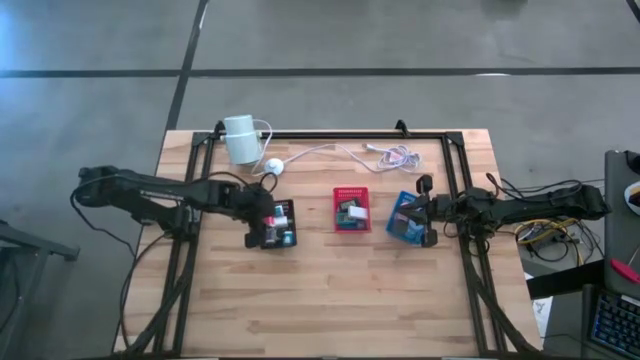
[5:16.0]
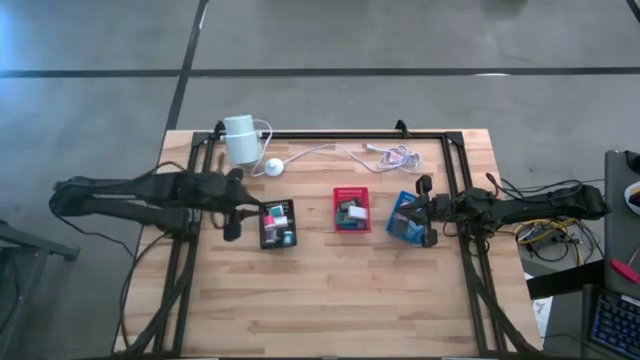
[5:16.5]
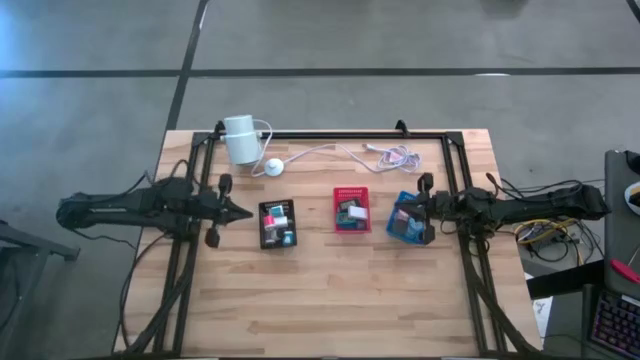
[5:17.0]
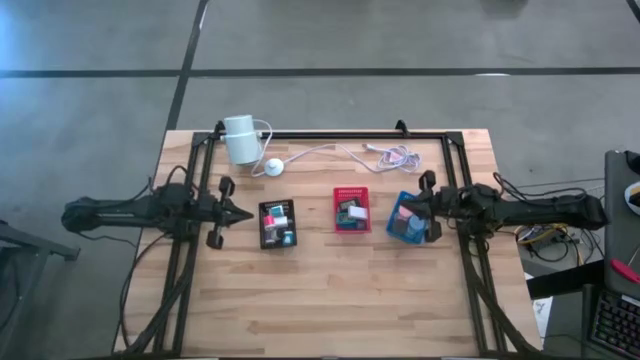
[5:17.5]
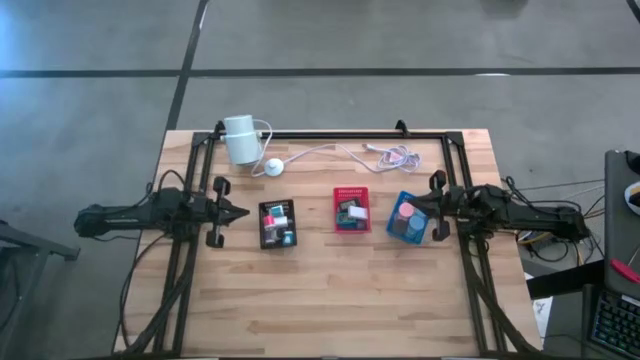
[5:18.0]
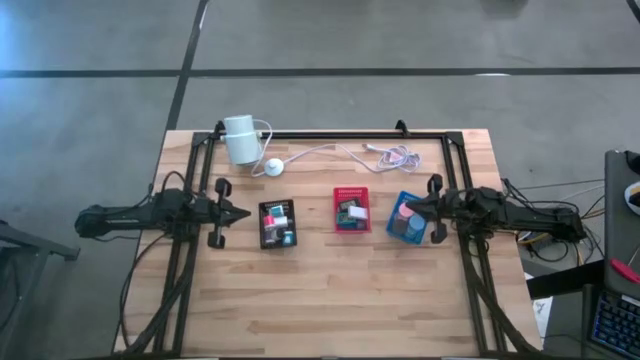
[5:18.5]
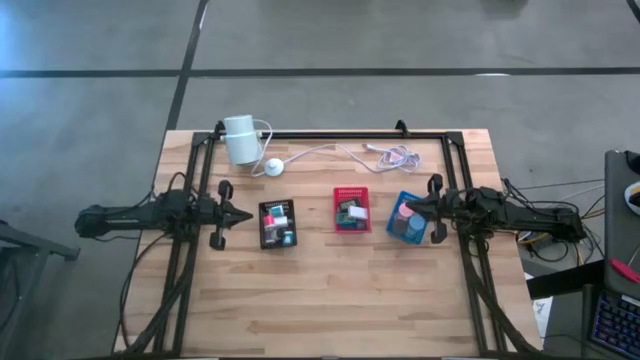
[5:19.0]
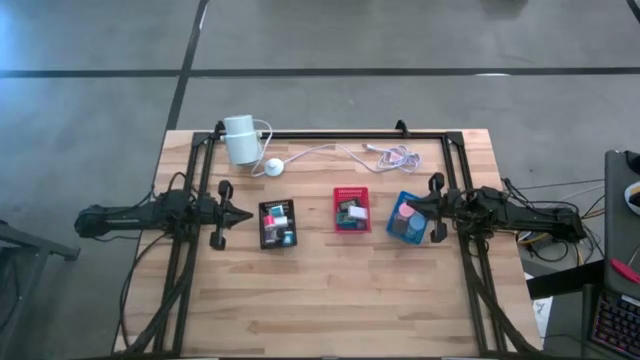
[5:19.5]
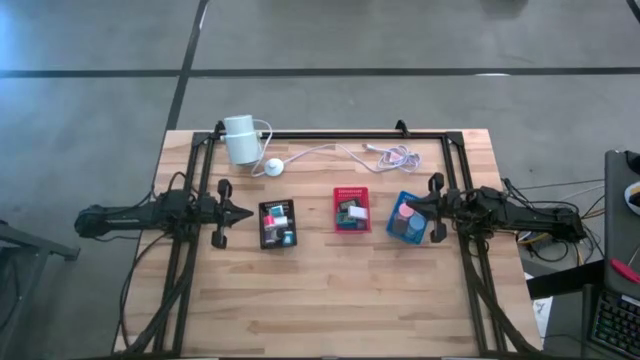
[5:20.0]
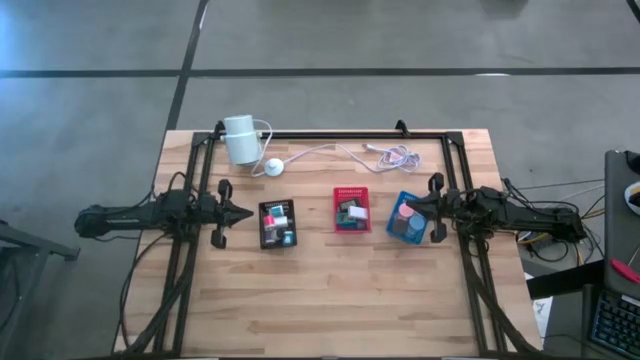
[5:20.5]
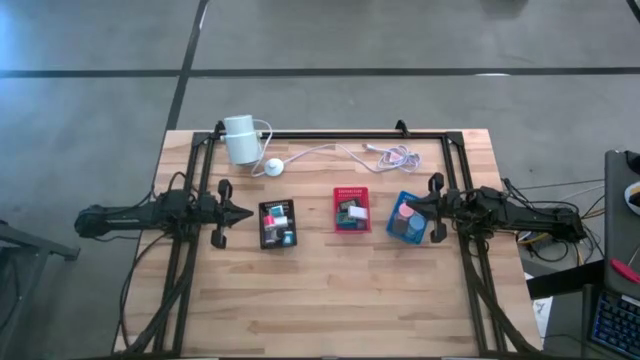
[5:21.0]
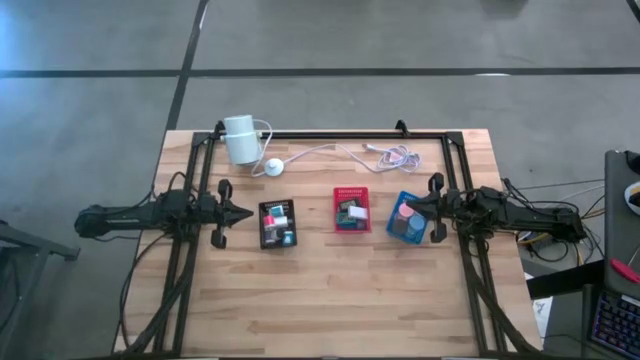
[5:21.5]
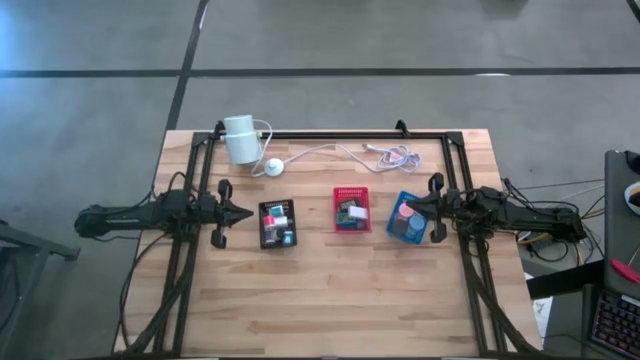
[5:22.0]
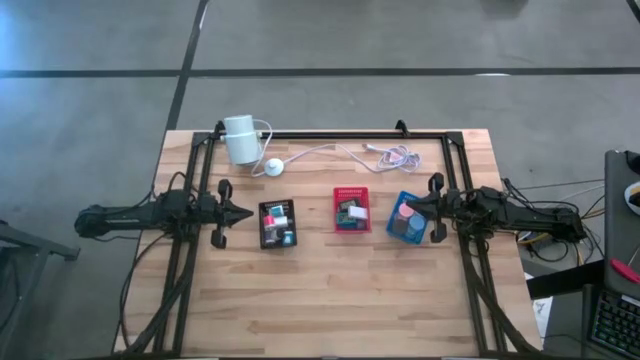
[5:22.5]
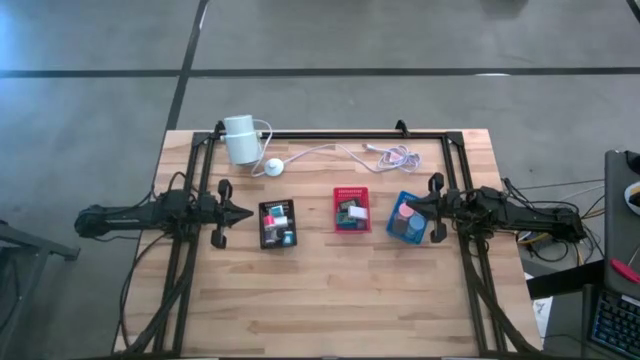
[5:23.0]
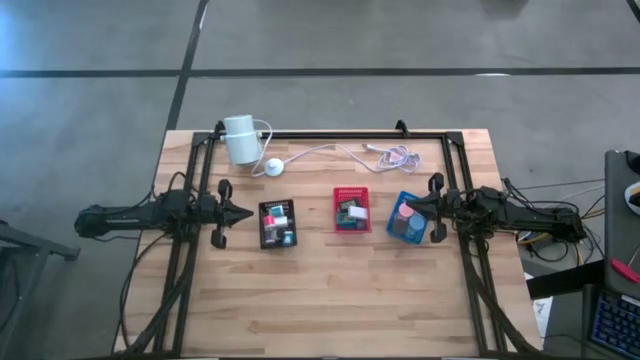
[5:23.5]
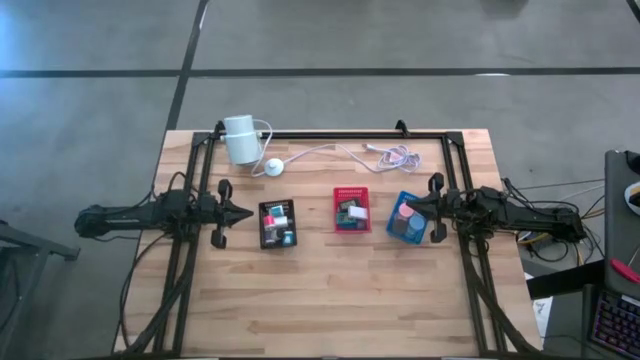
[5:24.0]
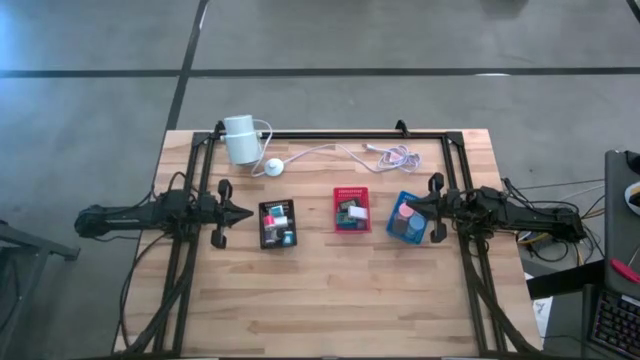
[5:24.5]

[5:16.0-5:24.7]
Task: Pick & Place Office items
Return to Home Position

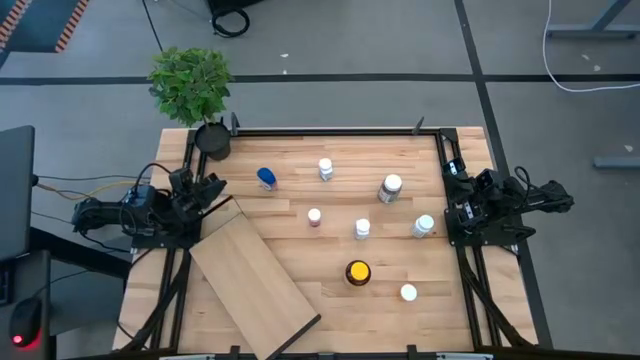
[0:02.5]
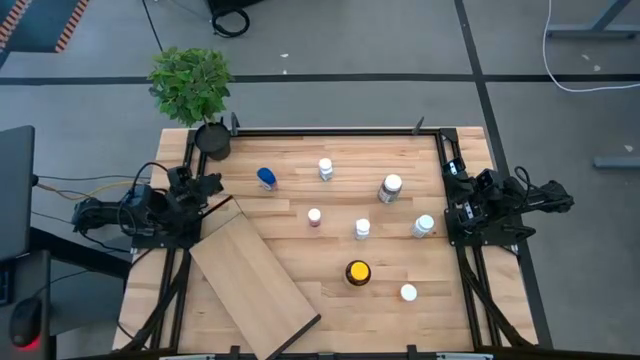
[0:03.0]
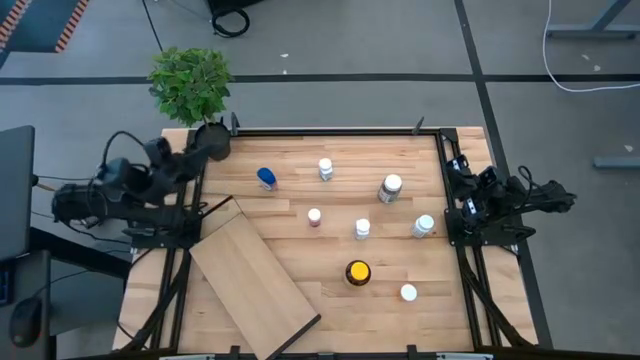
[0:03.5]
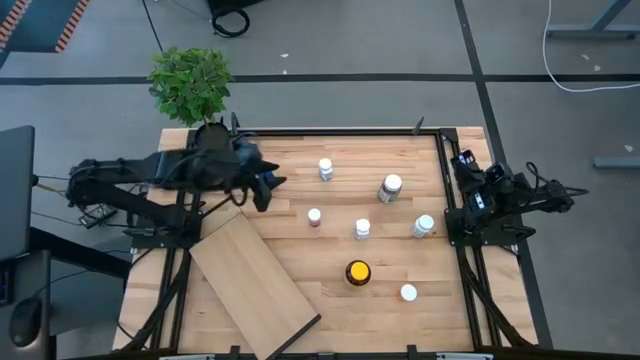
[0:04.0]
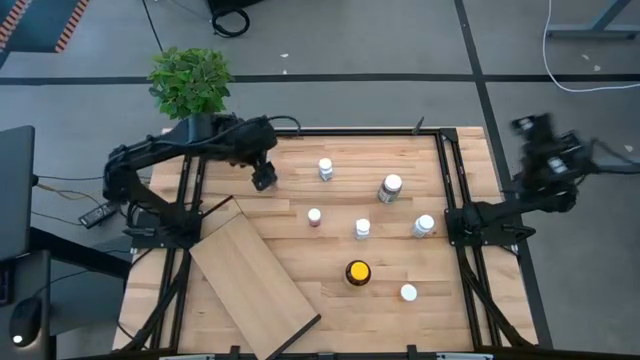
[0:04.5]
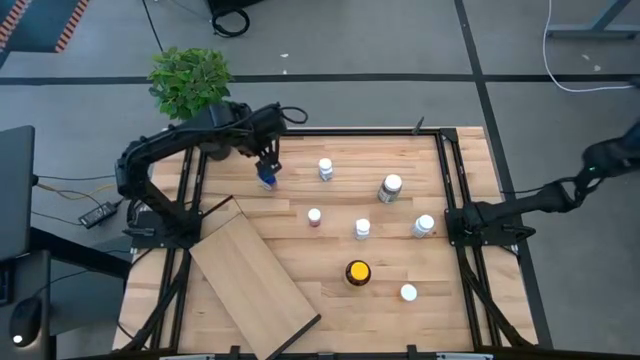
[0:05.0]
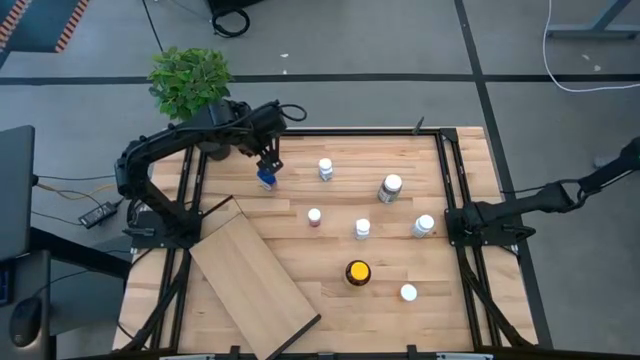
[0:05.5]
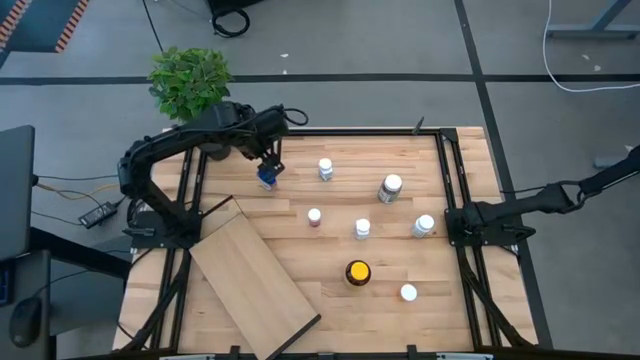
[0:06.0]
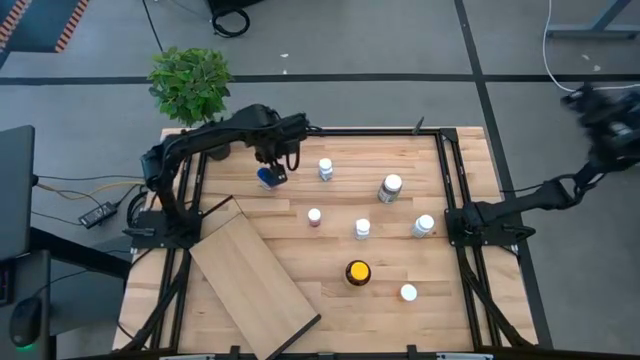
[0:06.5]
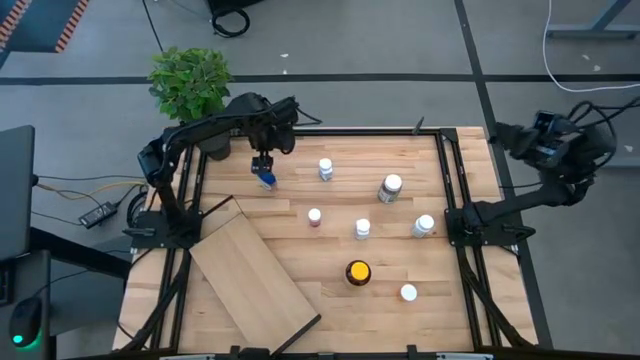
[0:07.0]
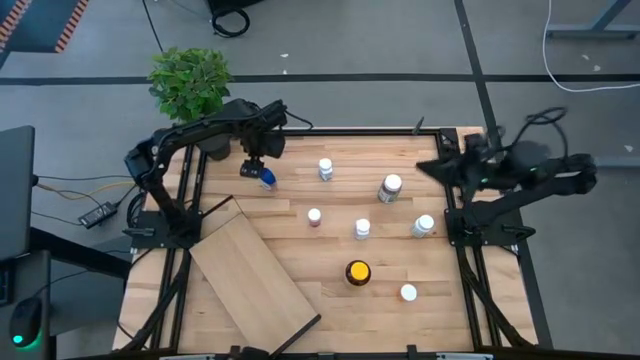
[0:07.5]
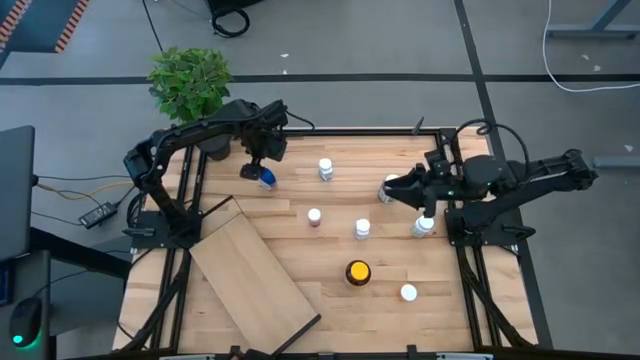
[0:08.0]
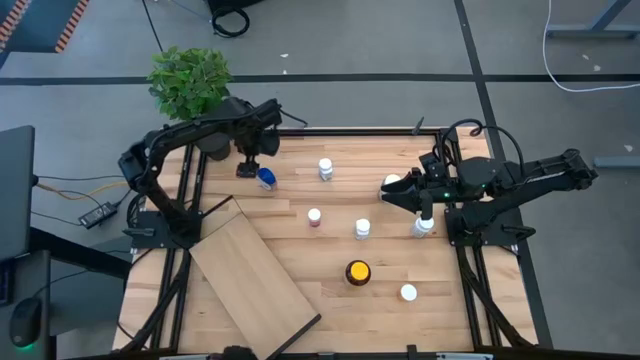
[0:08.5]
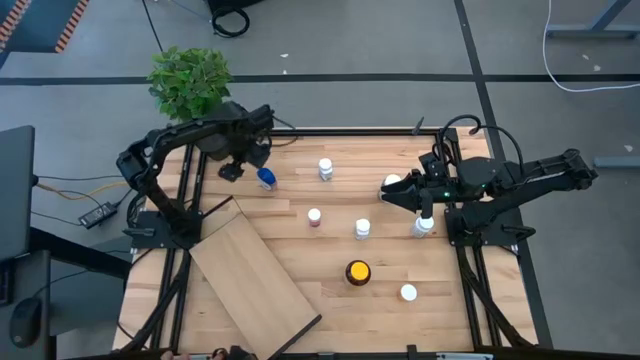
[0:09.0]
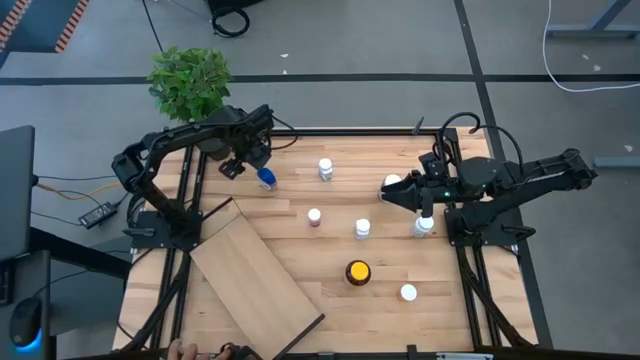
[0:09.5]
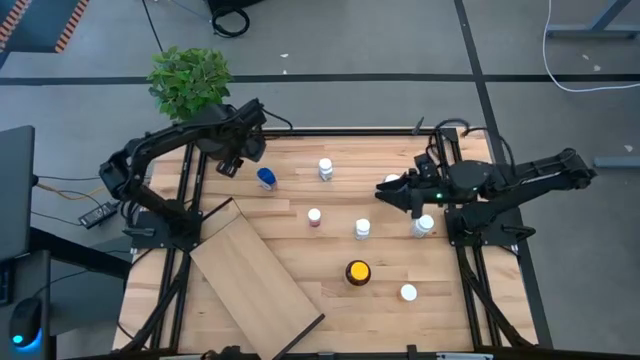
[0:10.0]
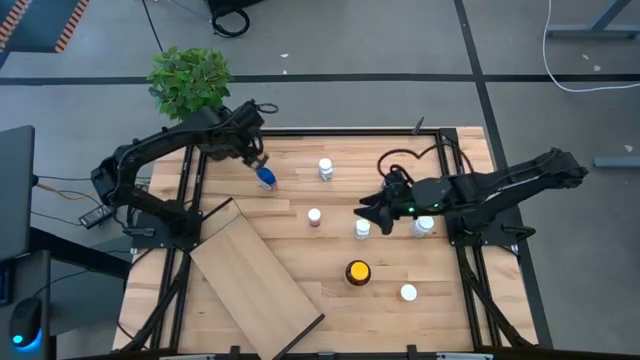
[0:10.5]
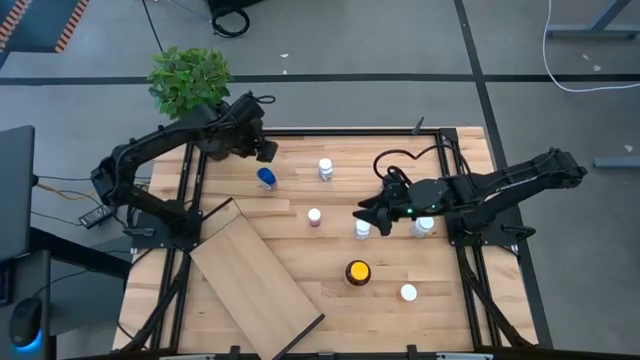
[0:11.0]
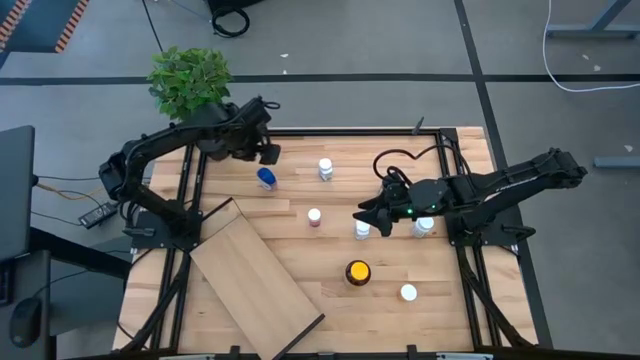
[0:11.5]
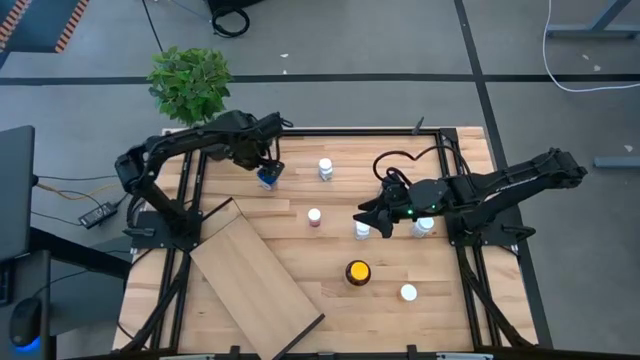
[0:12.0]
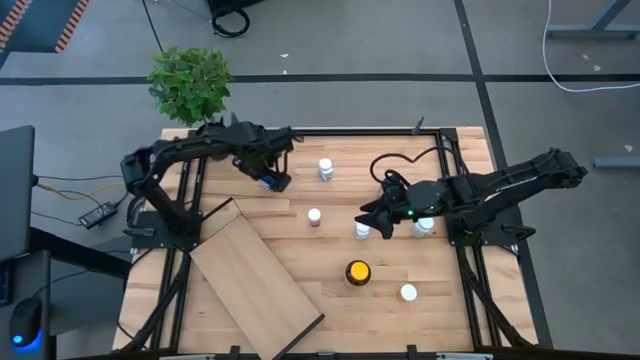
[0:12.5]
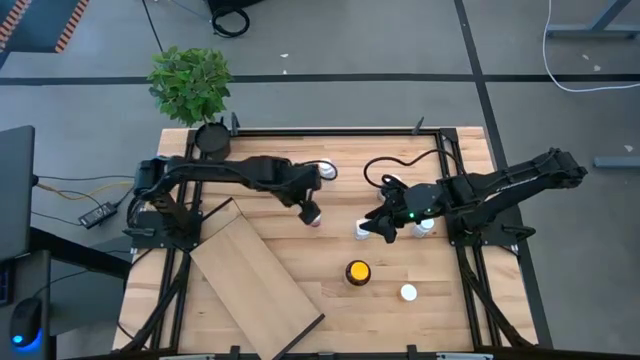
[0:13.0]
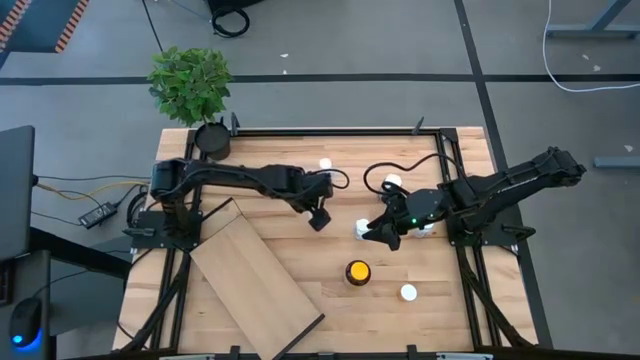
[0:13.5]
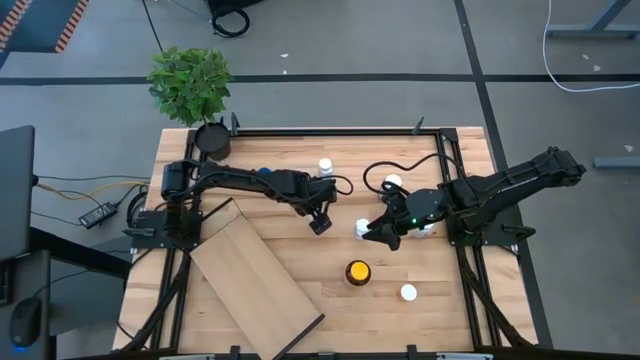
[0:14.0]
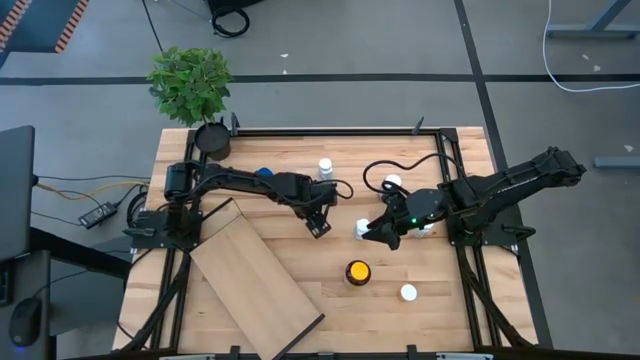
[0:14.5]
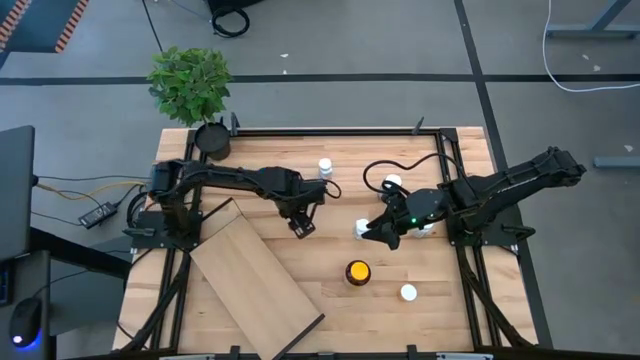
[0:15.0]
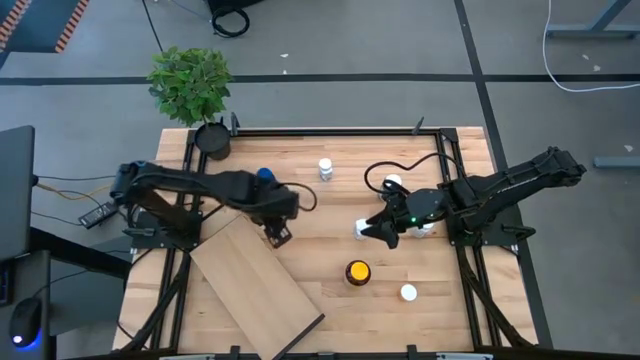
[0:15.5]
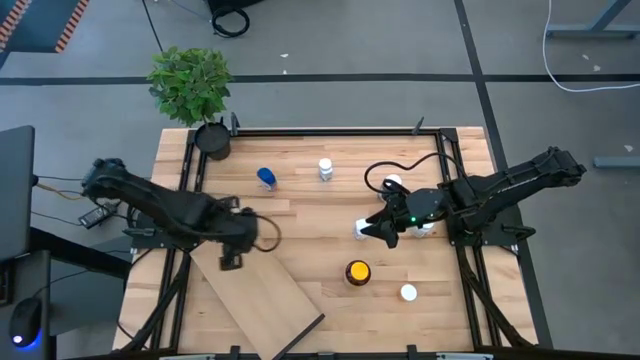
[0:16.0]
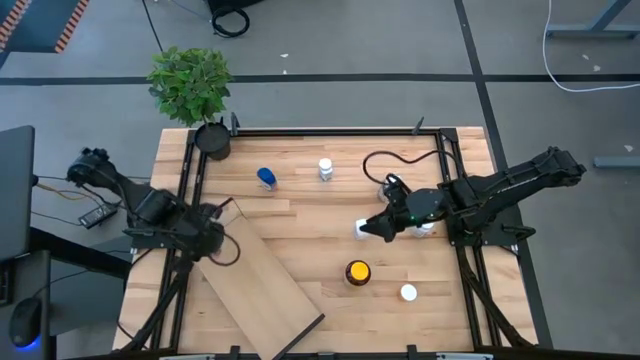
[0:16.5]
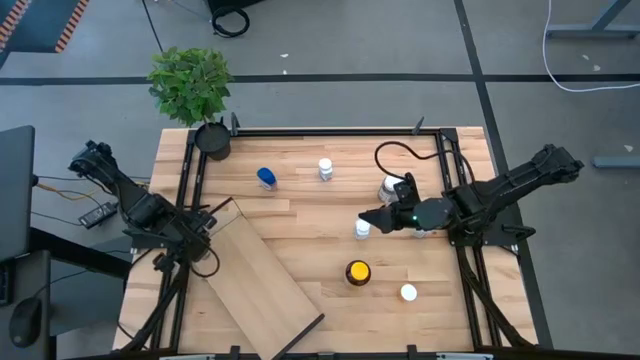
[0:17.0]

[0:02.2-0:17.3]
Task: Pick and place medicine bottles onto shelf by color
Put the pink pill bottle on the shelf
